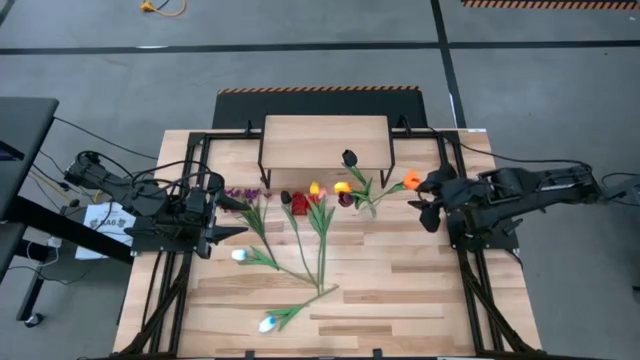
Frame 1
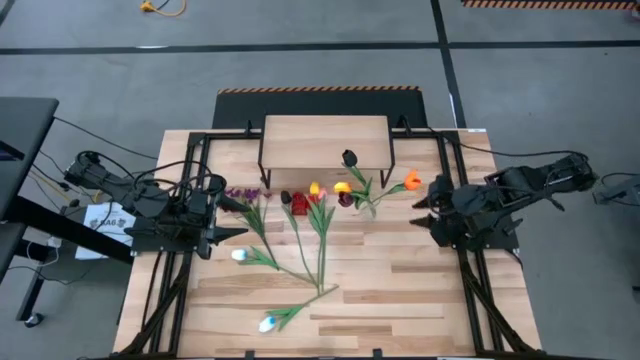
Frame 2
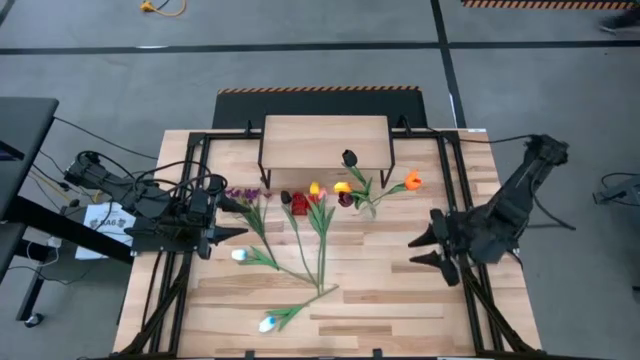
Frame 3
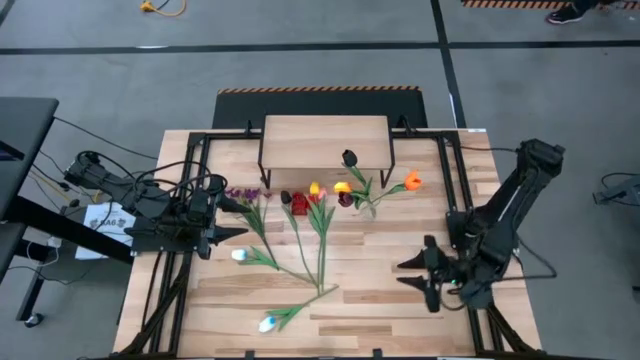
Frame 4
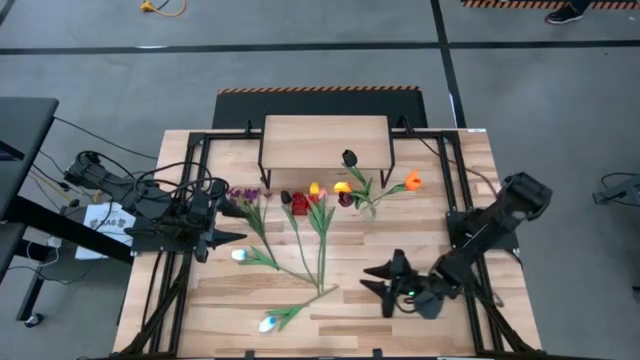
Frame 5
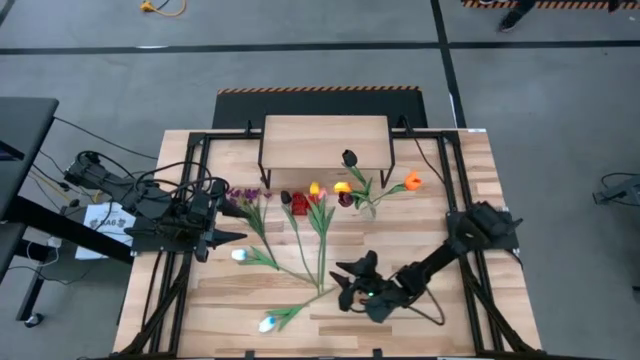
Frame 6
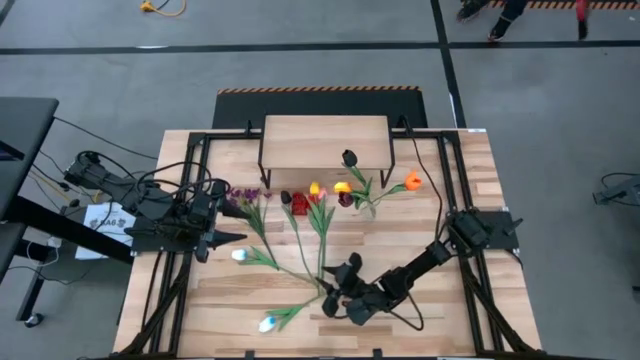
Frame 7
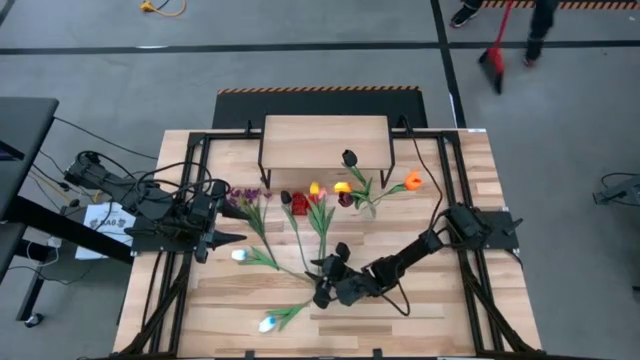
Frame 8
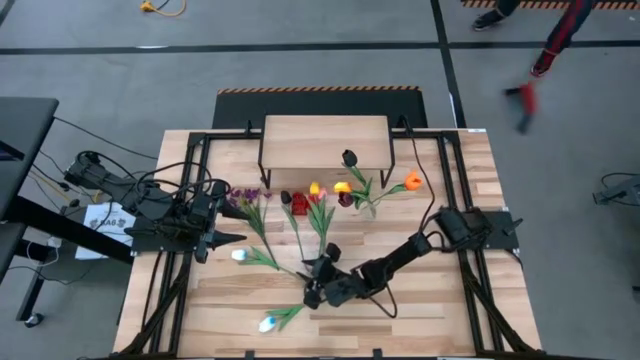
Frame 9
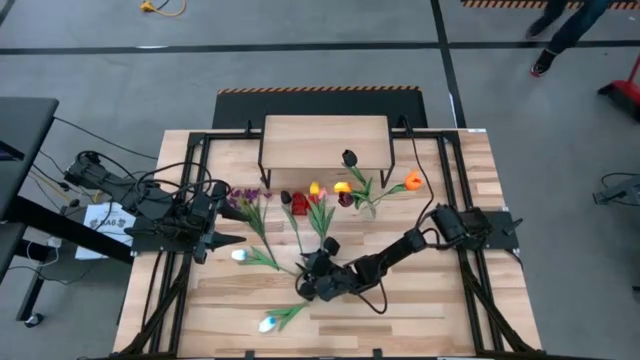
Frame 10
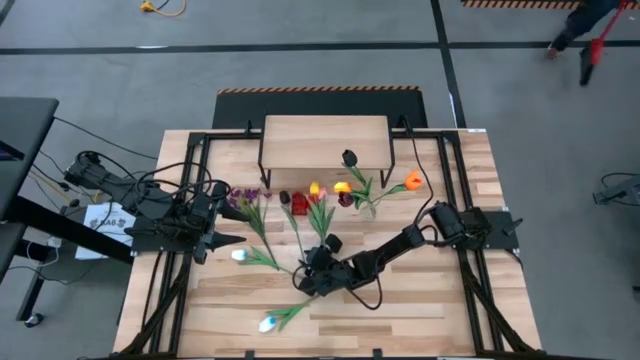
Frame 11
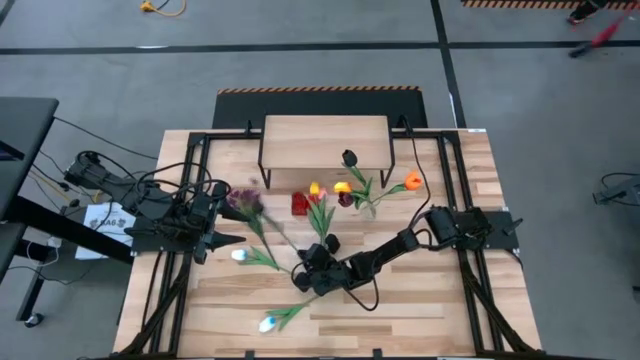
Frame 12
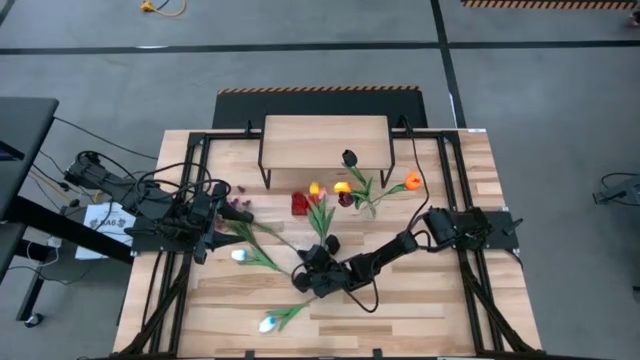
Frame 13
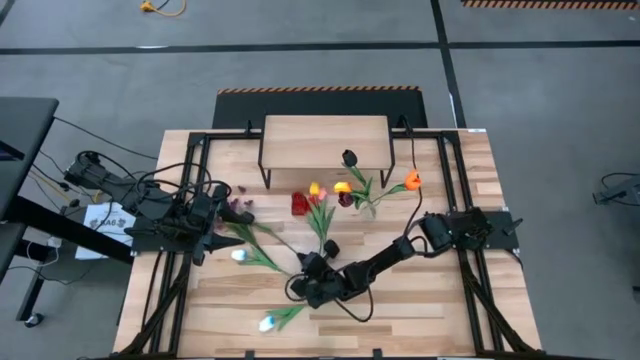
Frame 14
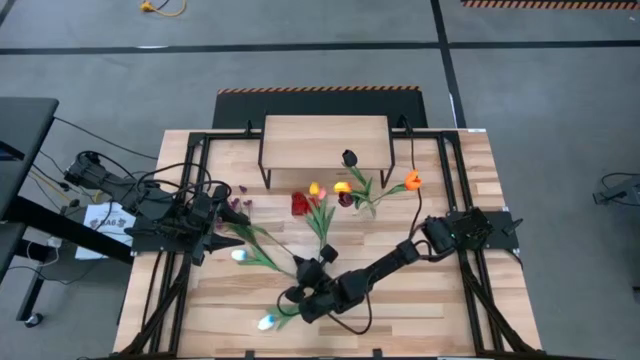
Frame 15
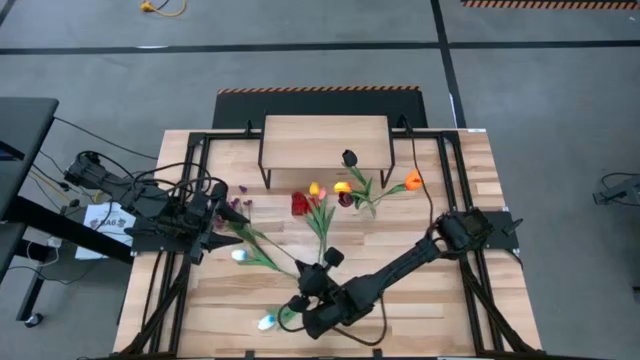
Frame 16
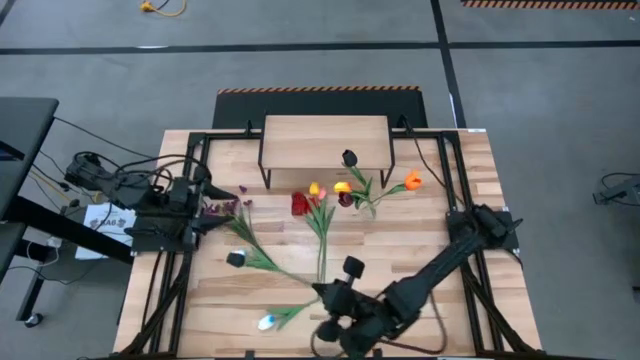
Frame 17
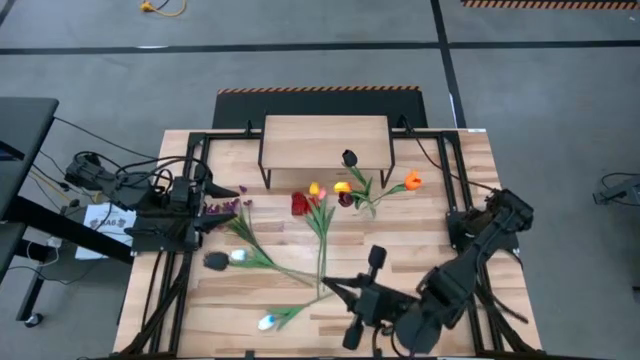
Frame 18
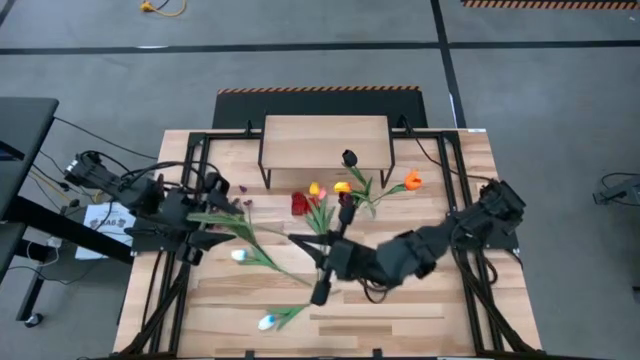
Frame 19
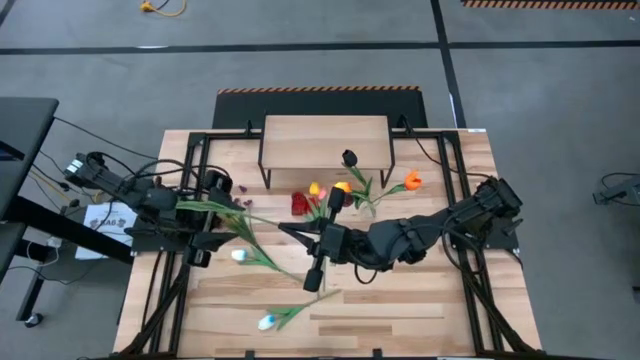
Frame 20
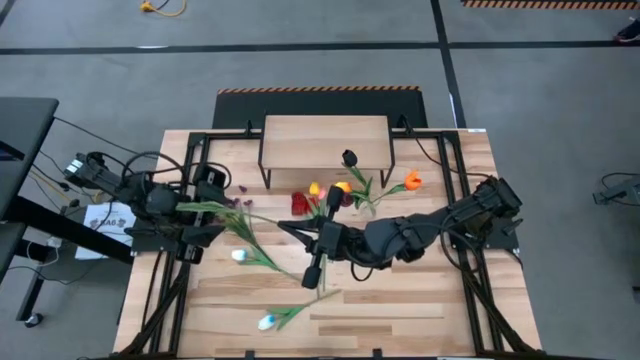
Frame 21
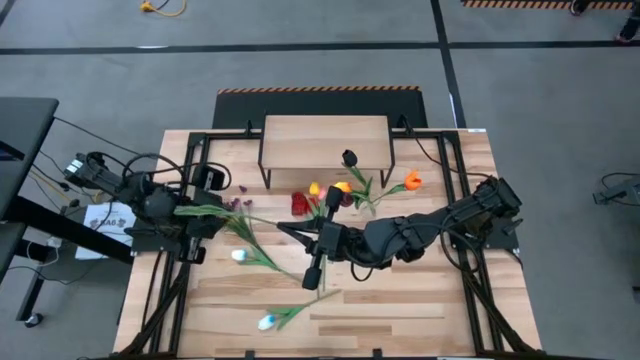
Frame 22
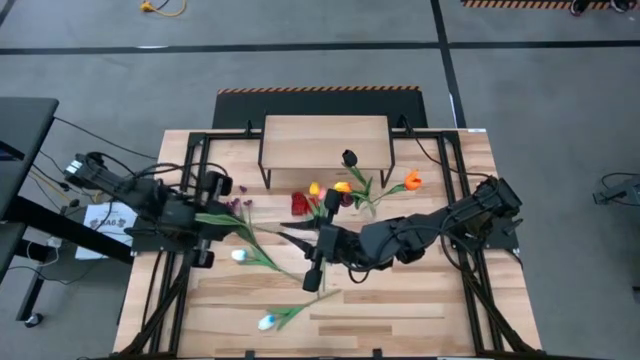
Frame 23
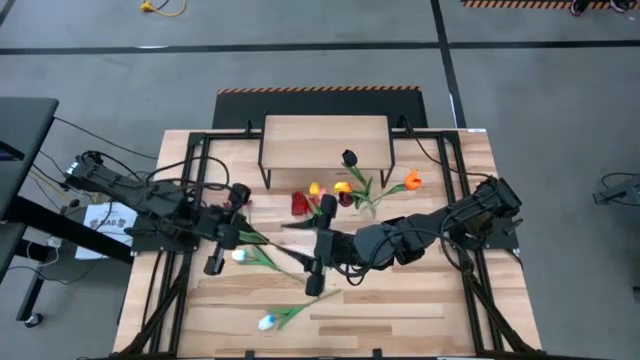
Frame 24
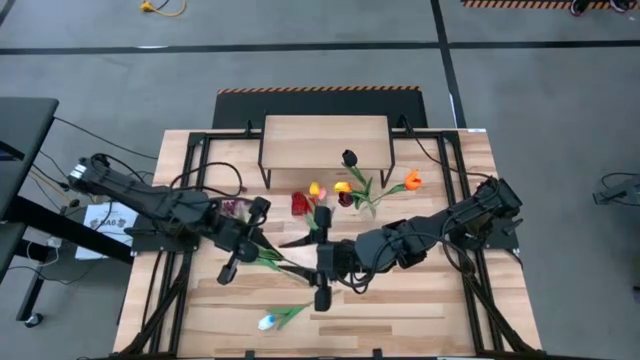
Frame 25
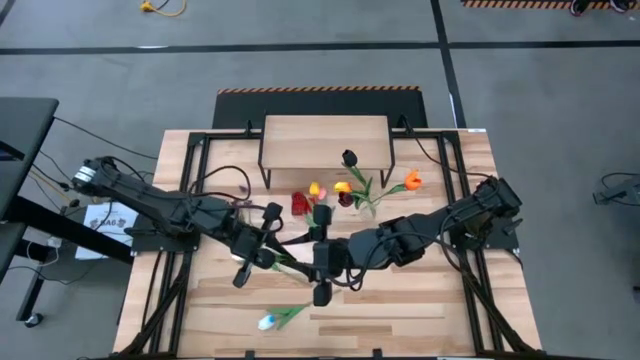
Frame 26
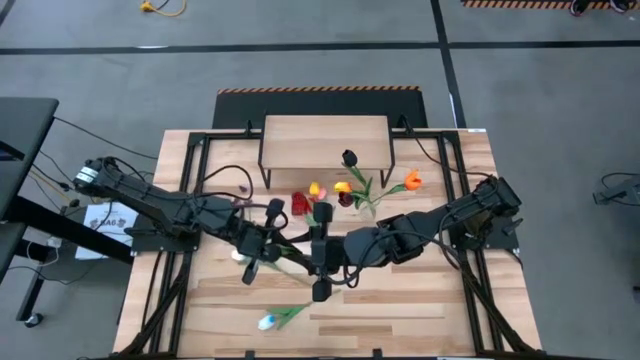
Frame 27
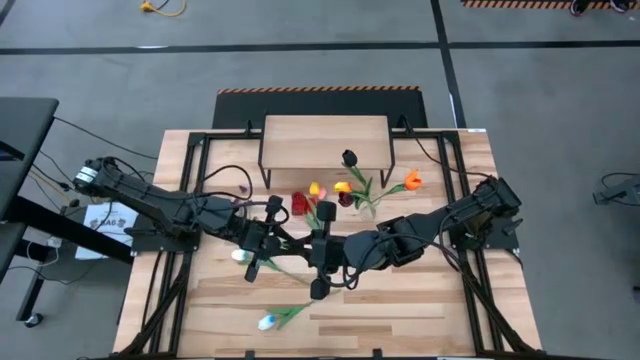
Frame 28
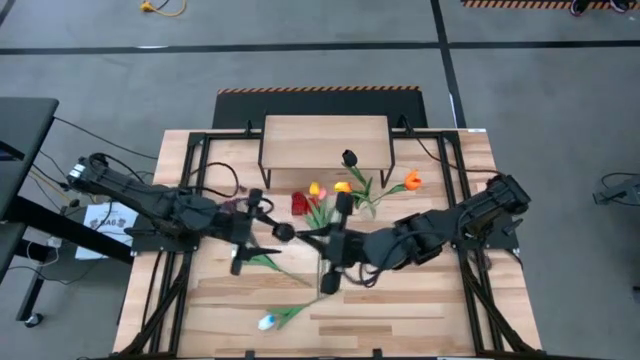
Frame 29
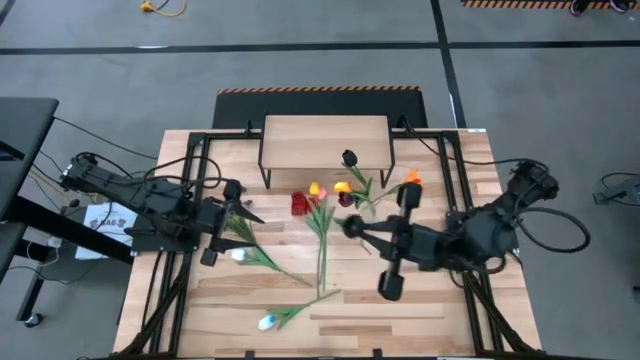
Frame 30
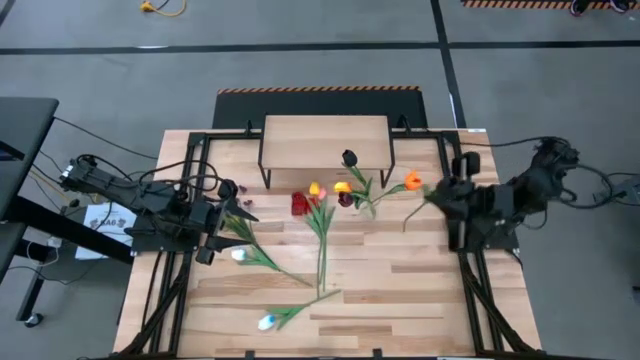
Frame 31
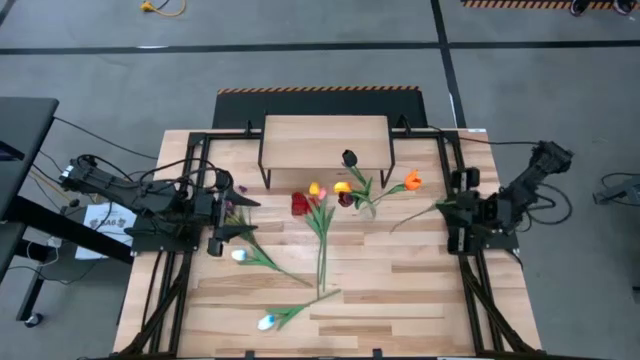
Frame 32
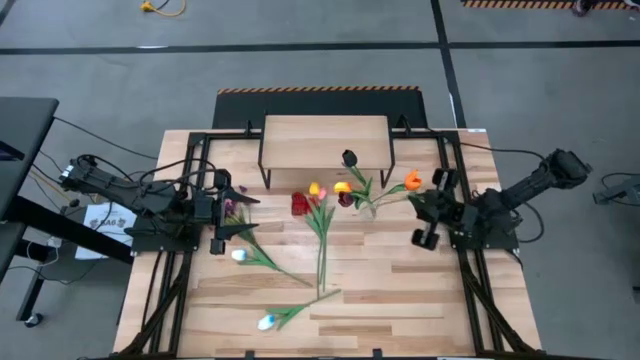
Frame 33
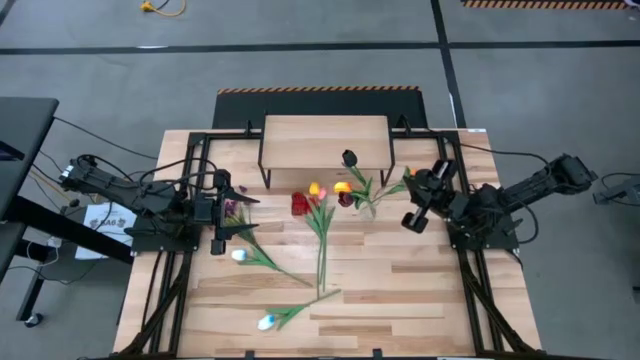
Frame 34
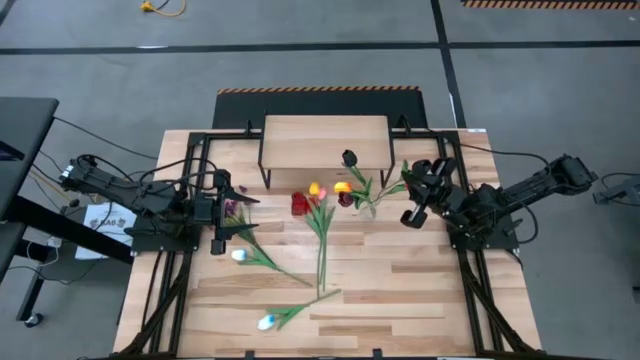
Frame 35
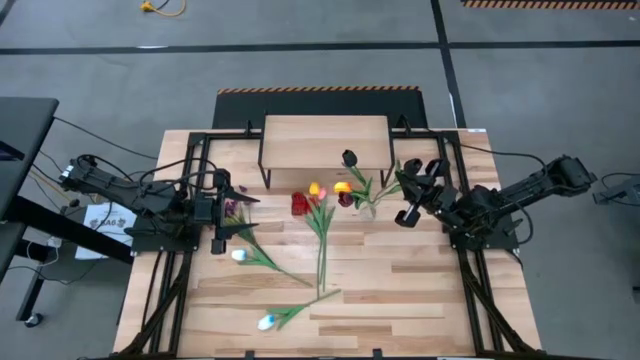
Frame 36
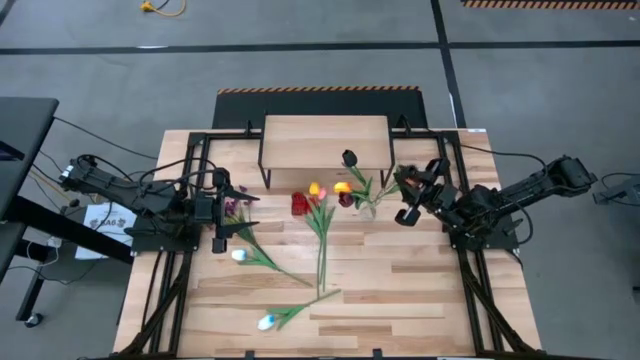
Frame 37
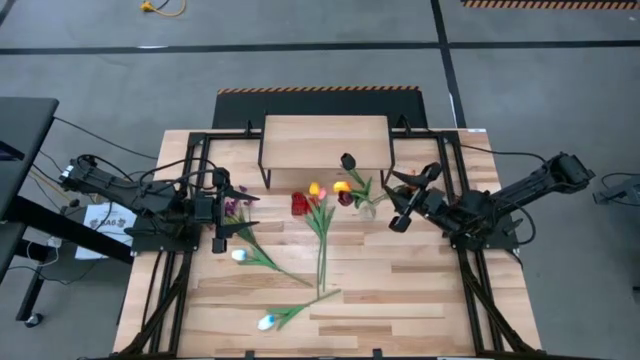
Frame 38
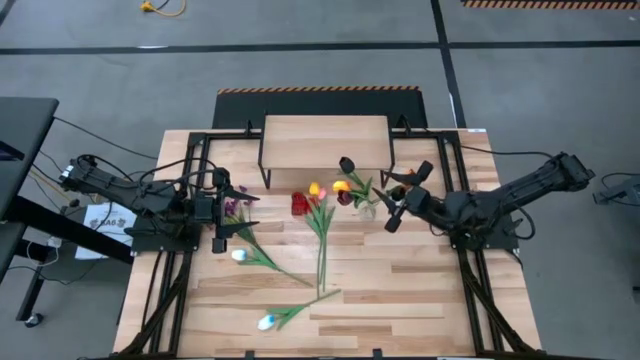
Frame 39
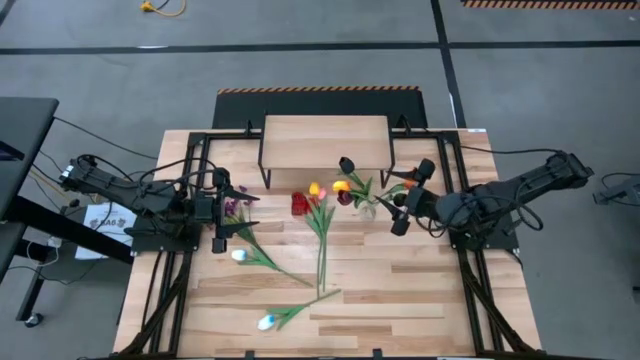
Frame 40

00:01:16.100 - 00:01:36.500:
Task: Pick and place flowers into a vace then onto a shelf
Put the black flower into the transparent vase
